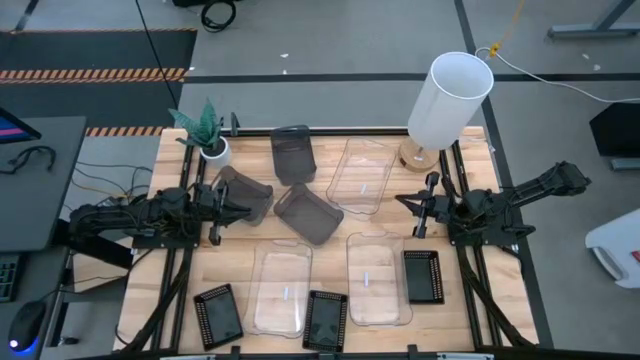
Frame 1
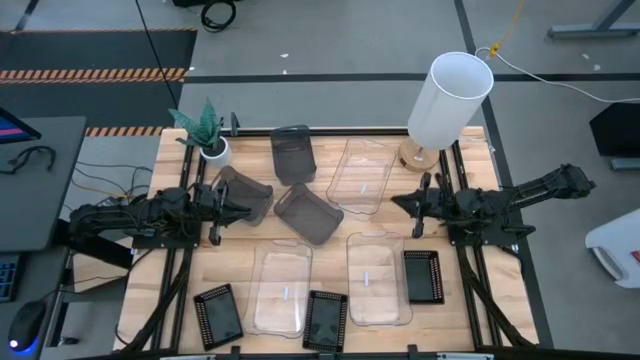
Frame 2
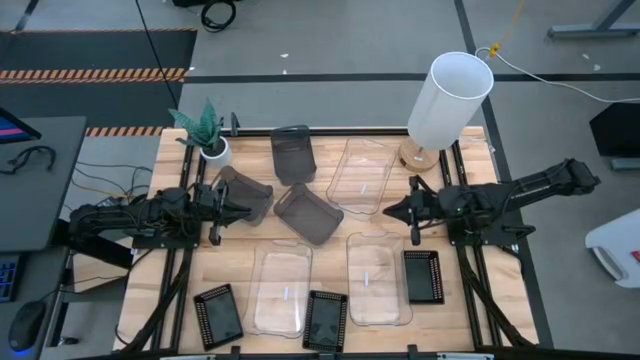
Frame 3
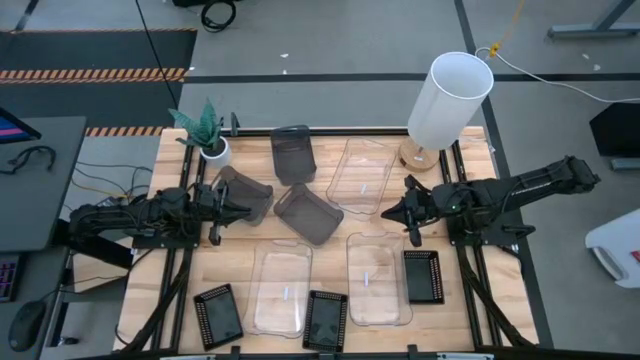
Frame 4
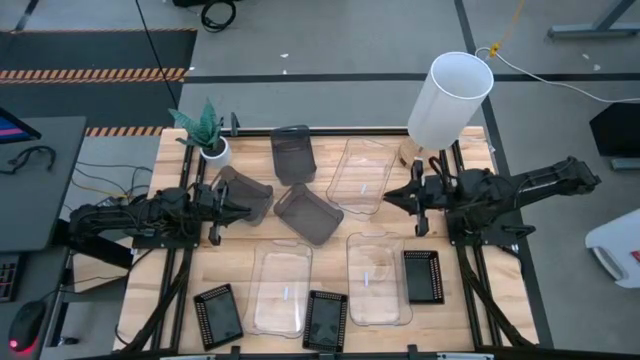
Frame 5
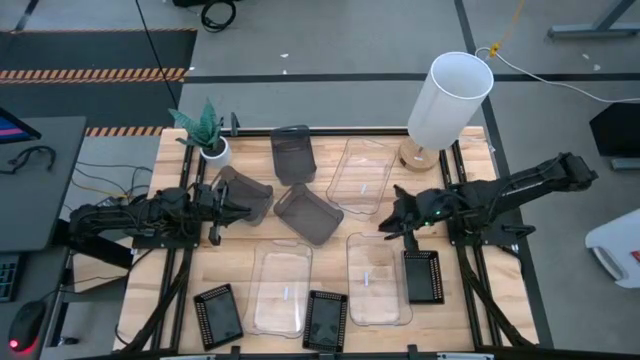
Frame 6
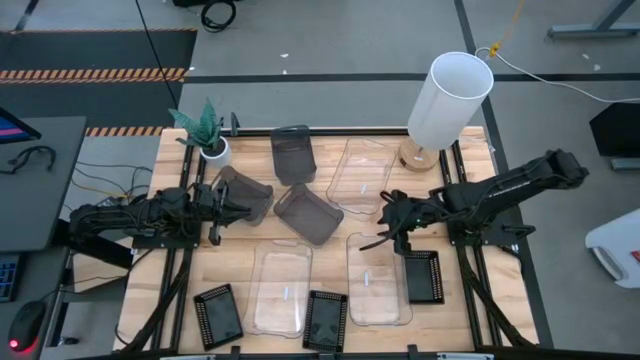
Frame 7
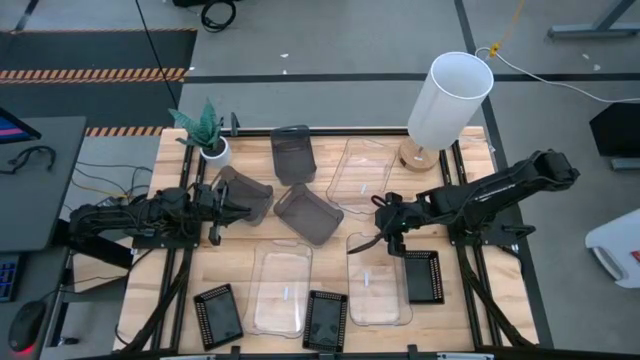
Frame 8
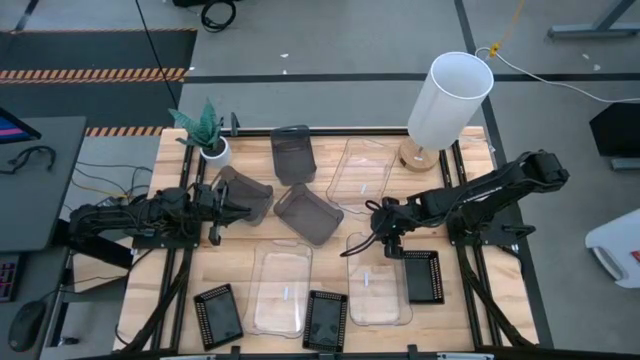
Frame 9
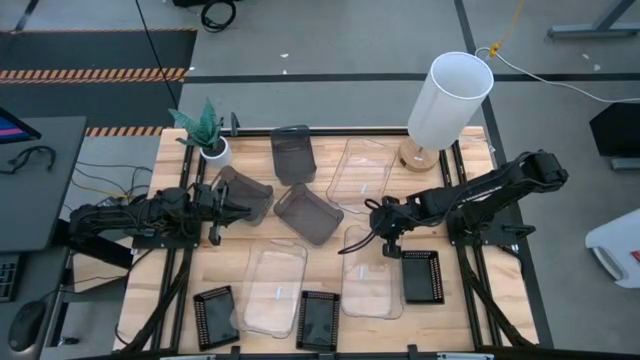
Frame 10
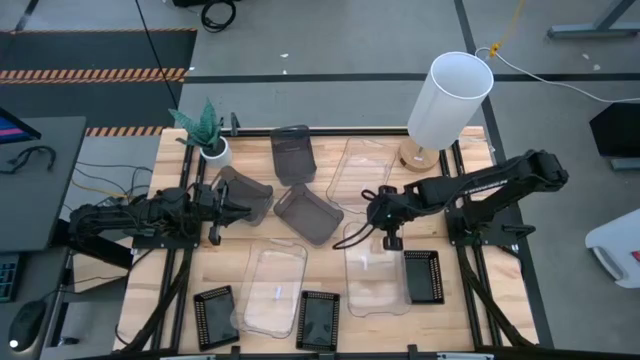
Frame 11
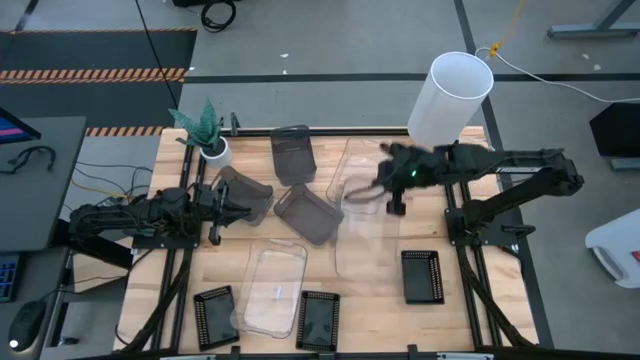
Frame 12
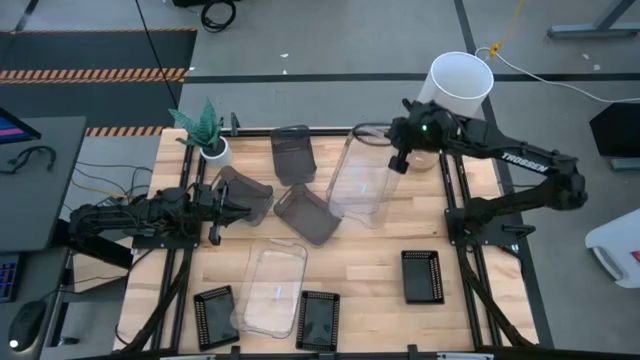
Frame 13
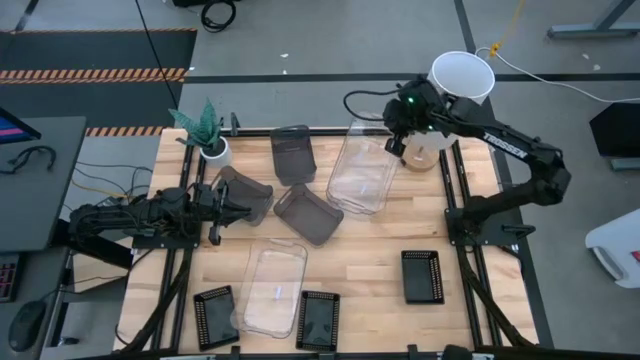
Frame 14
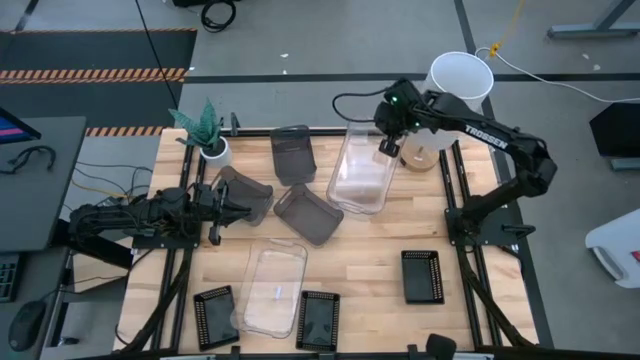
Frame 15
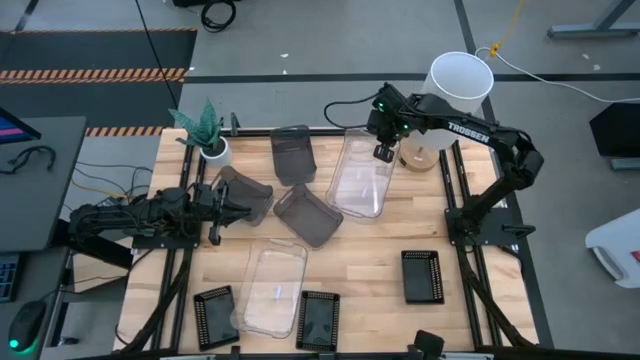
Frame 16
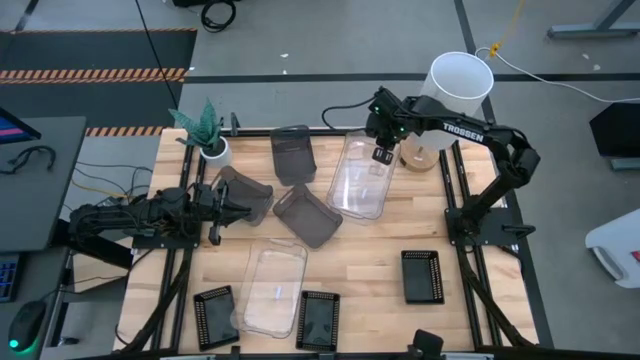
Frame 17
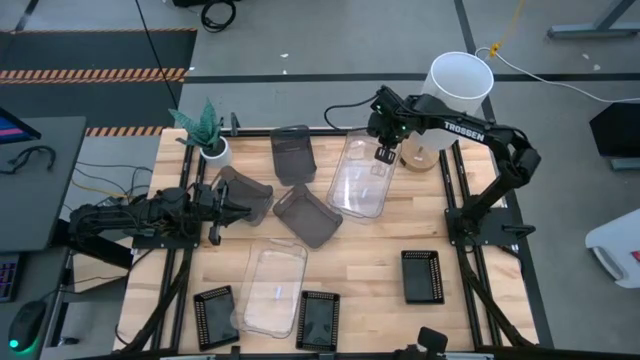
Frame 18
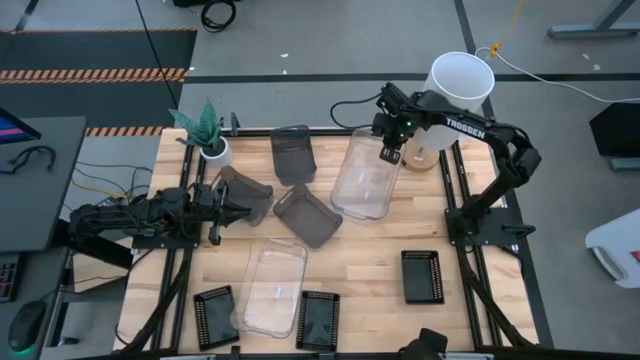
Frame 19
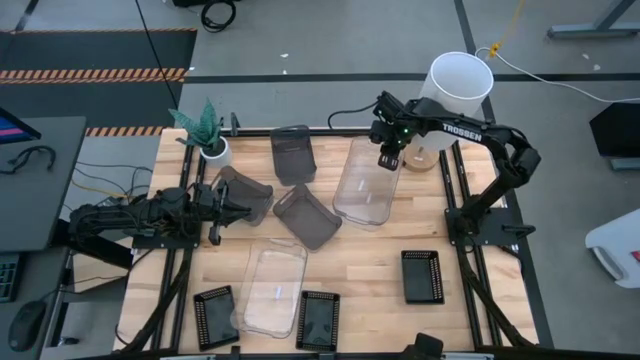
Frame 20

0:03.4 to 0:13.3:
Stack the bottom right transparent bin on the top transparent bin

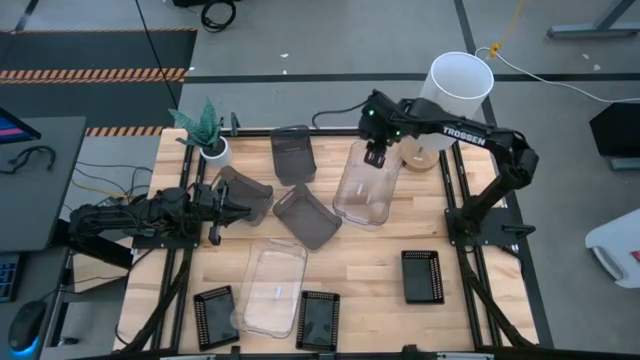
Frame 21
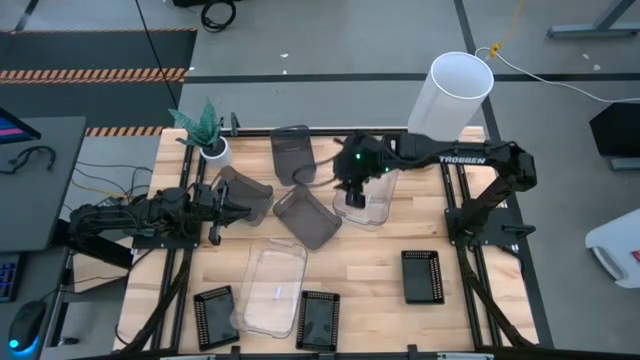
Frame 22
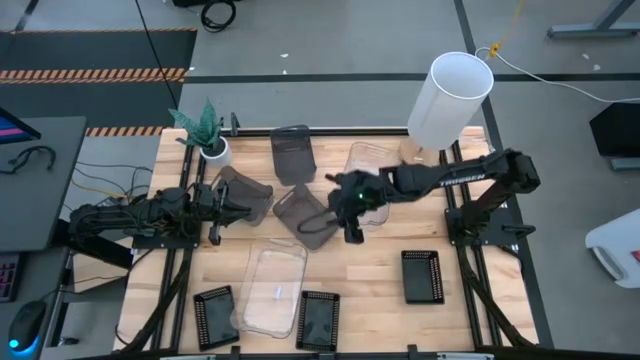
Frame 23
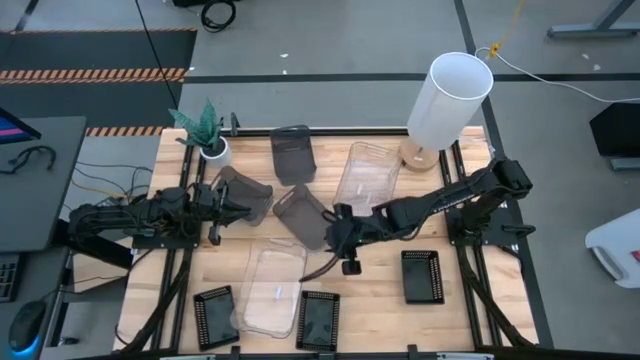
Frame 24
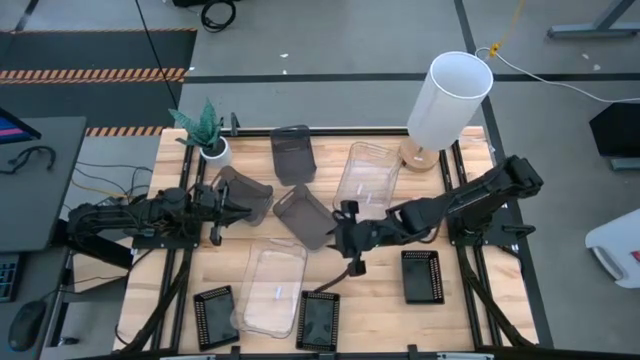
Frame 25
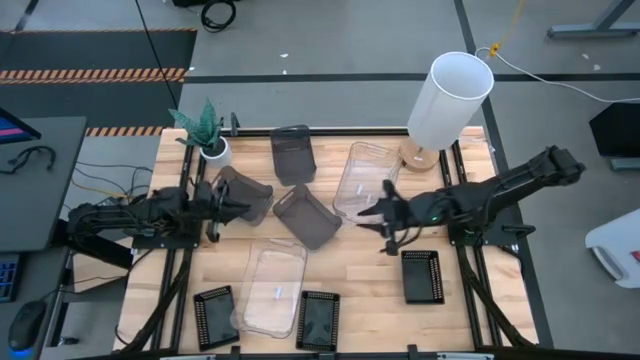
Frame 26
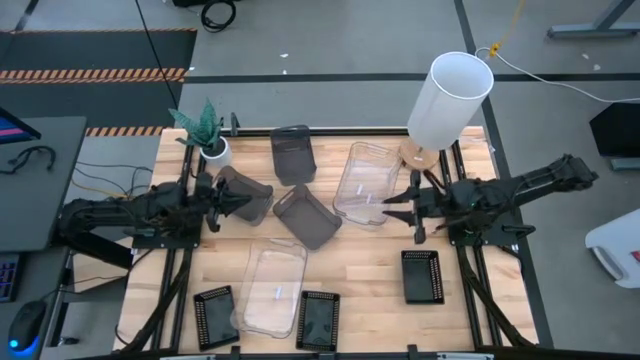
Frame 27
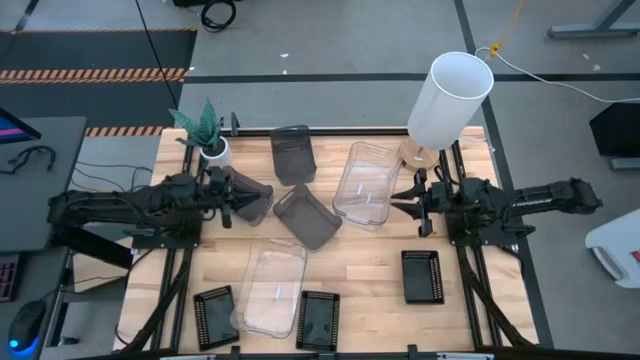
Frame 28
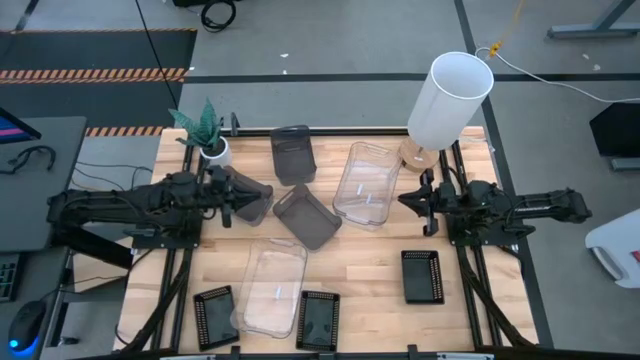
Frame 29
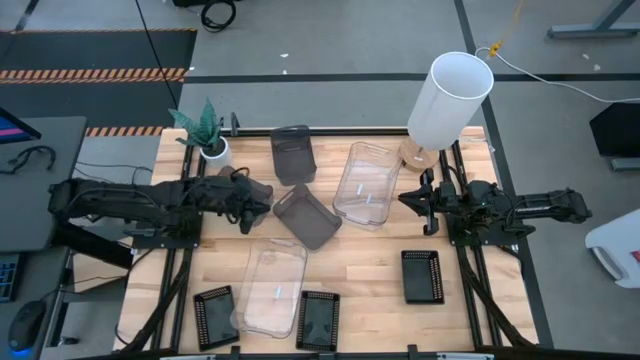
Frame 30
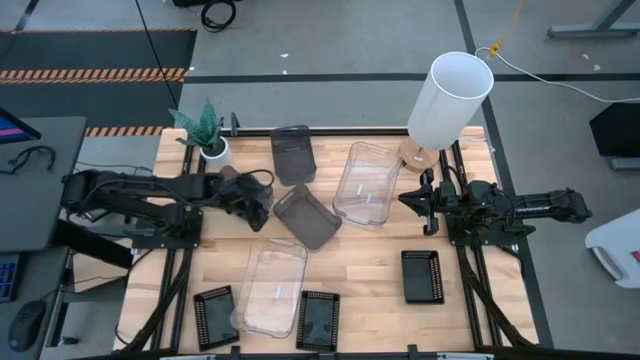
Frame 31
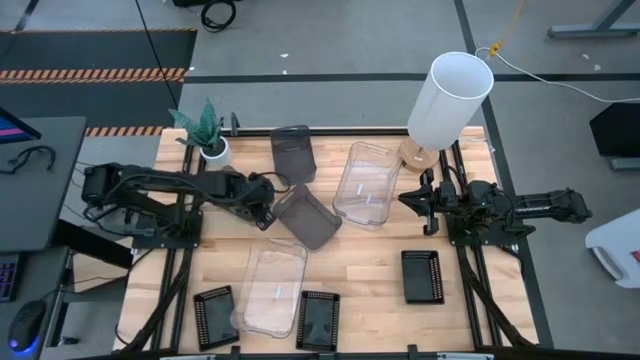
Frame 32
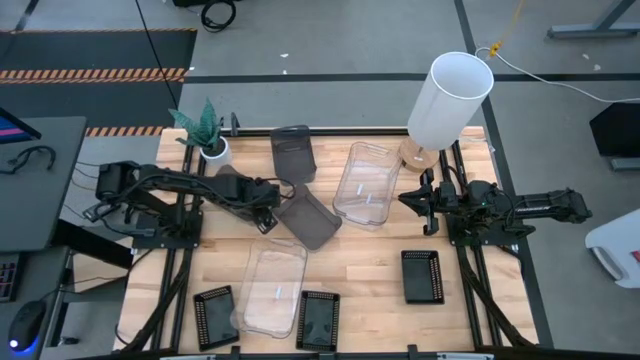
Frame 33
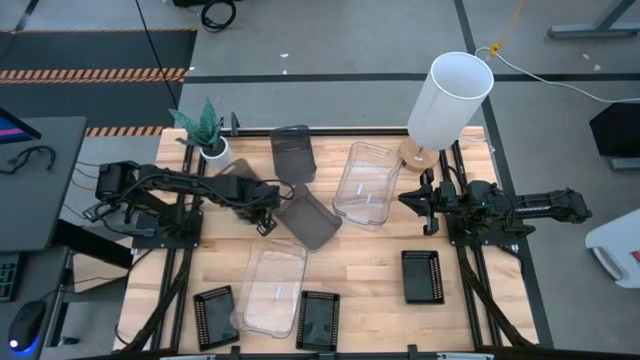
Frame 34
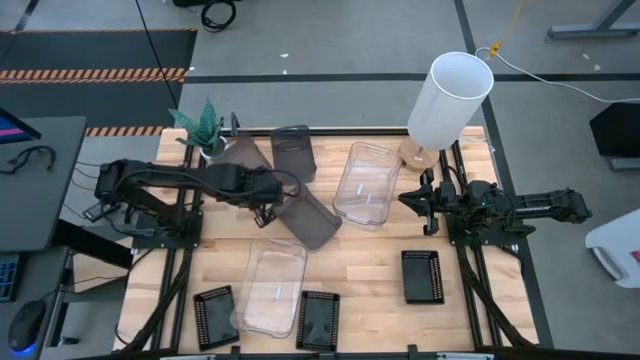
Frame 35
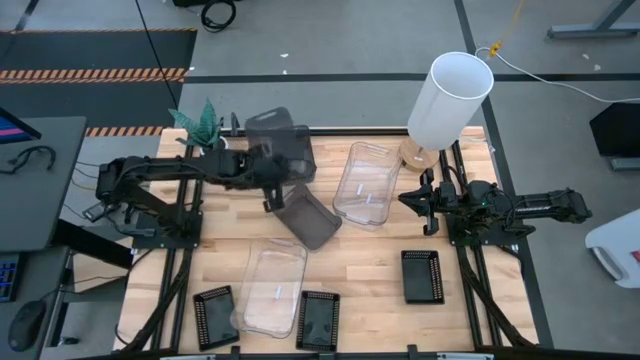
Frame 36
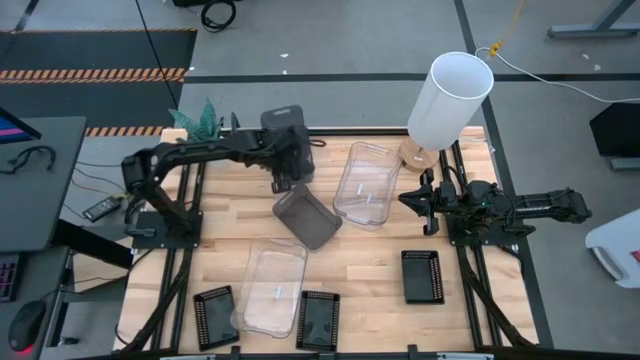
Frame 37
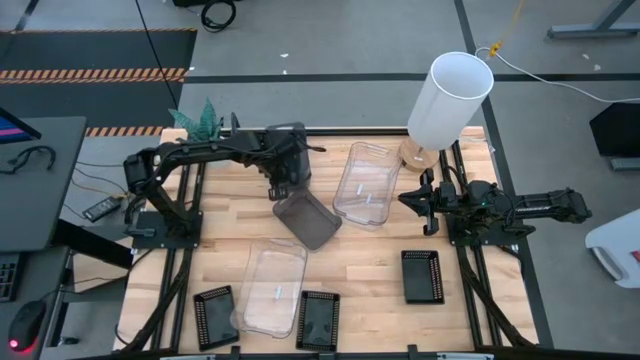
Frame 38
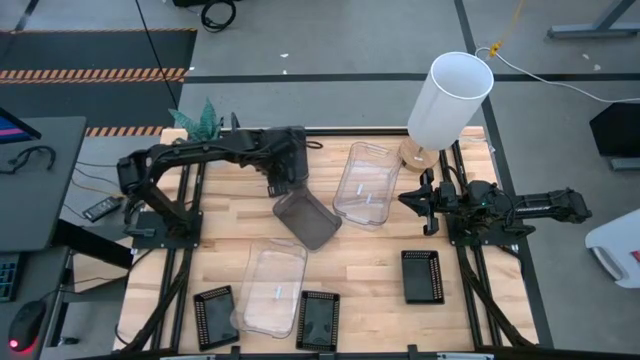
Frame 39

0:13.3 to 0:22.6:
Stack the bottom left black transparent bin on the top black transparent bin

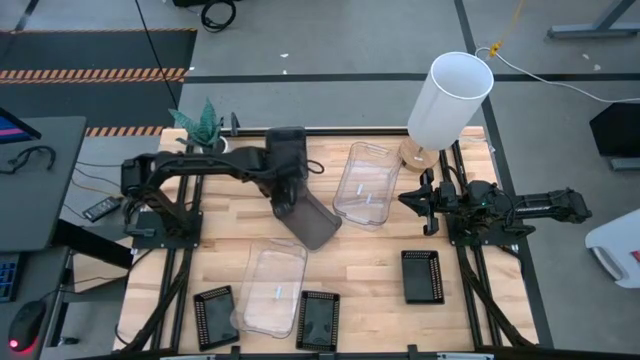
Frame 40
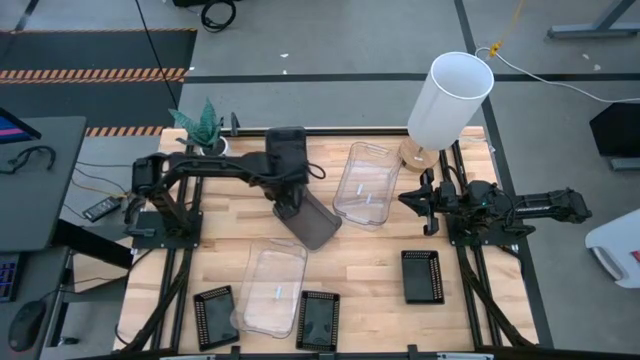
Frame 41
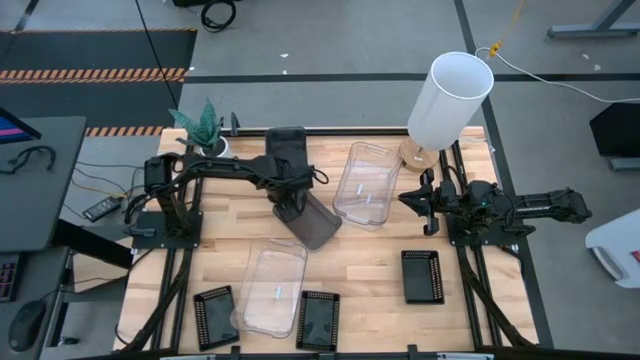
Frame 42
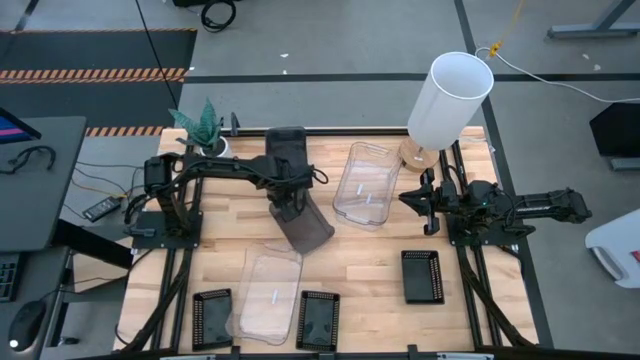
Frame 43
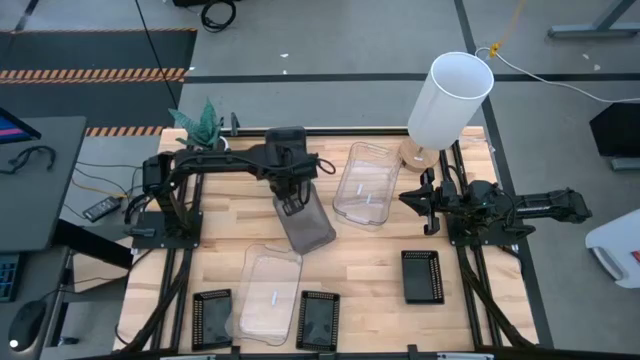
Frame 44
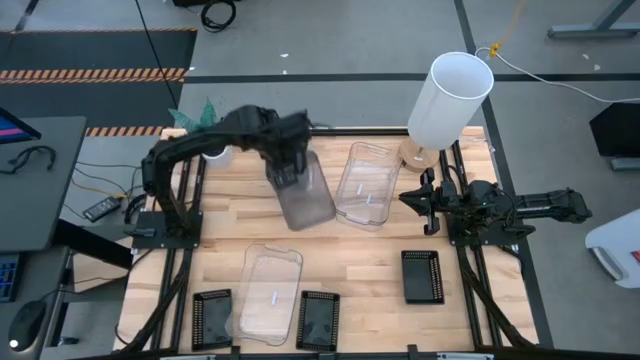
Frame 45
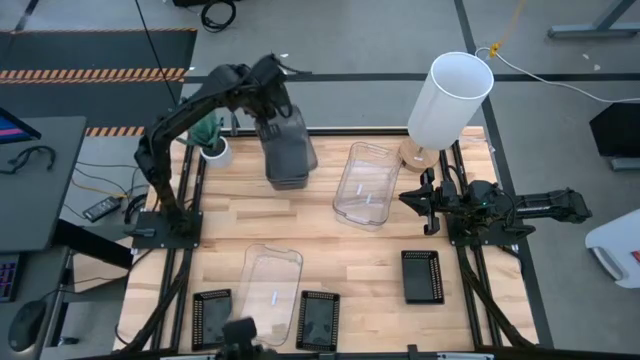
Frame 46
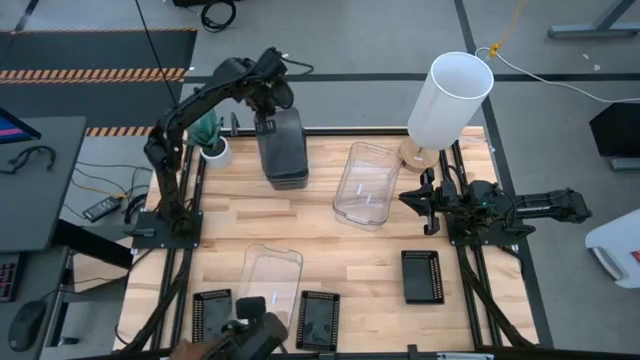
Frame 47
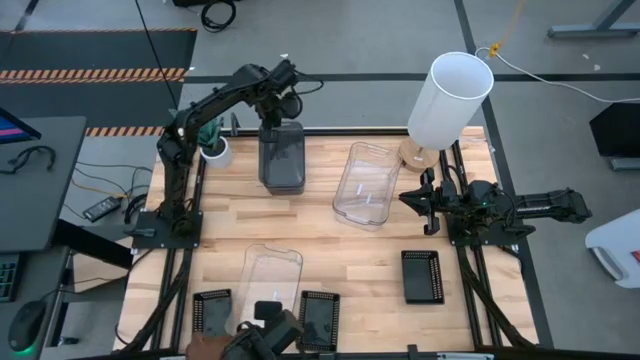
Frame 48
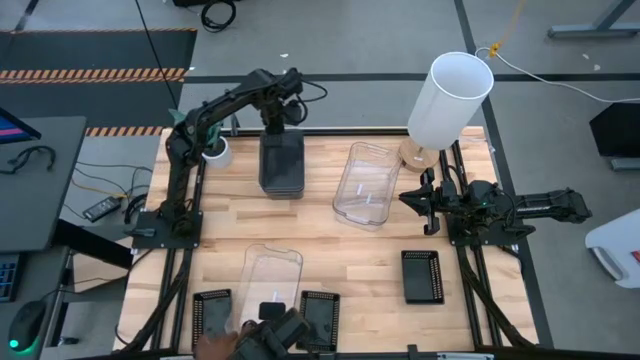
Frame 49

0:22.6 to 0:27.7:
Stack the bottom black transparent bin on the black transparent bins
